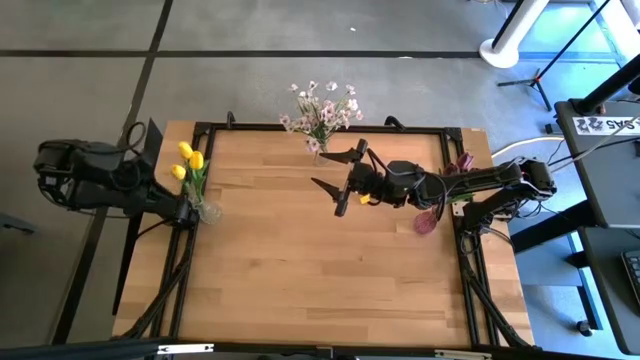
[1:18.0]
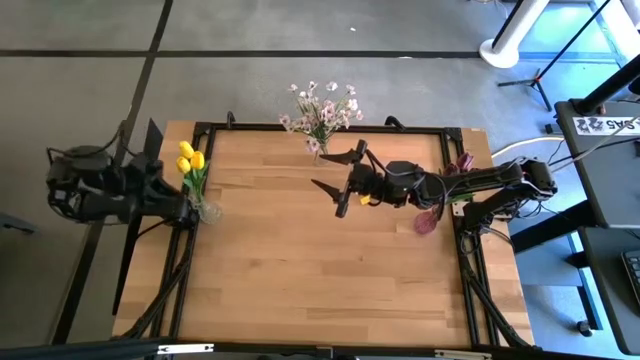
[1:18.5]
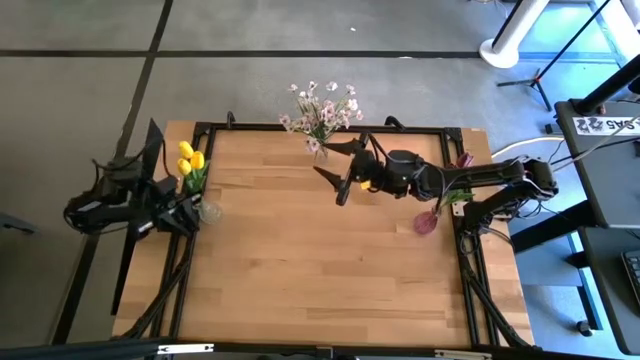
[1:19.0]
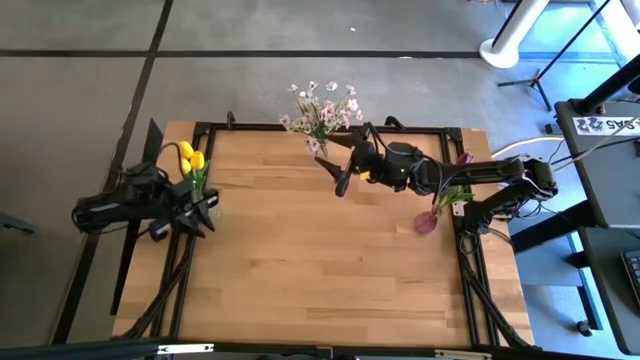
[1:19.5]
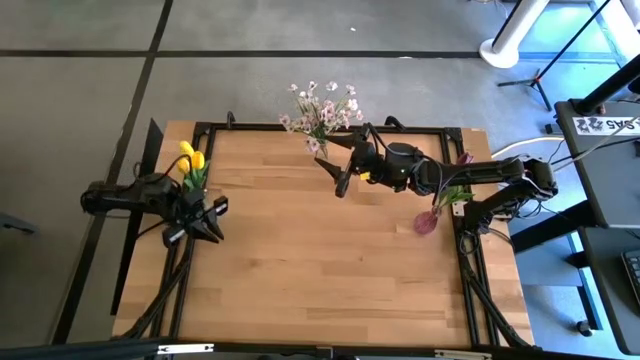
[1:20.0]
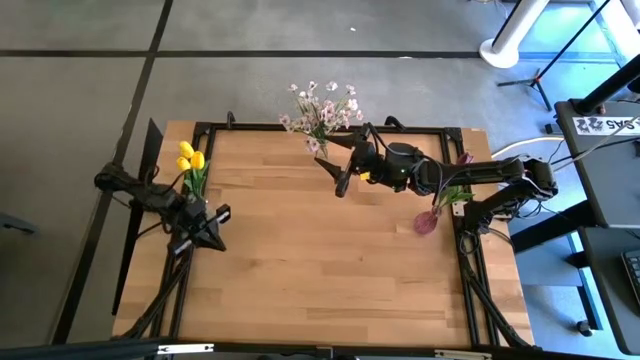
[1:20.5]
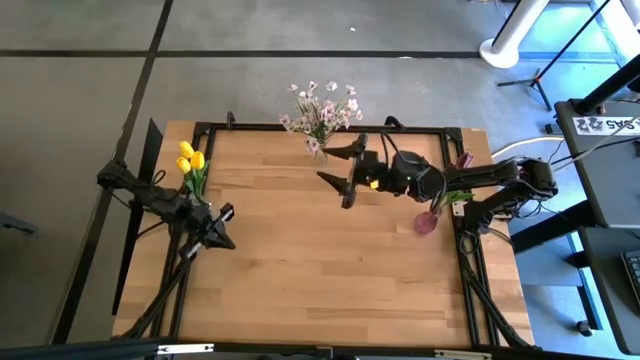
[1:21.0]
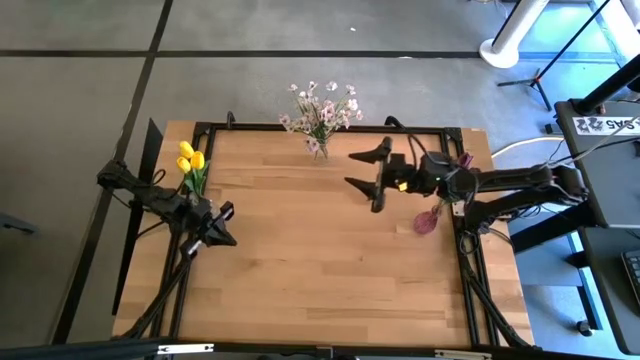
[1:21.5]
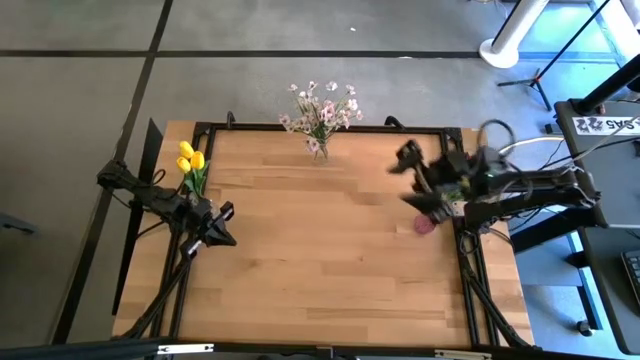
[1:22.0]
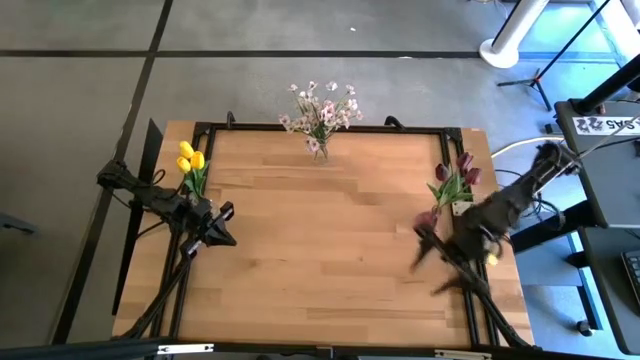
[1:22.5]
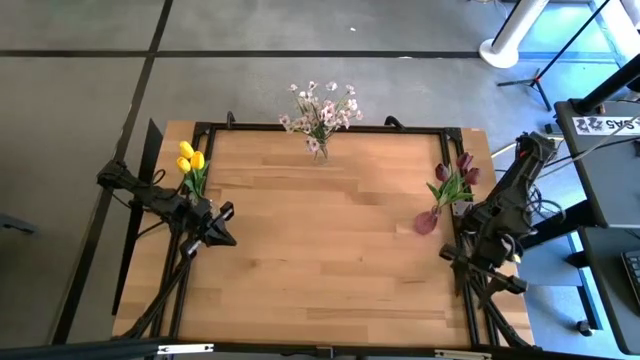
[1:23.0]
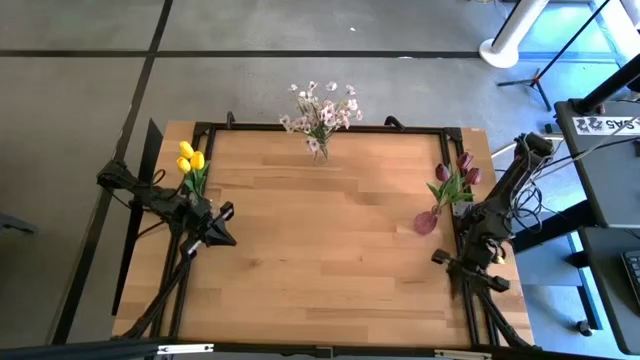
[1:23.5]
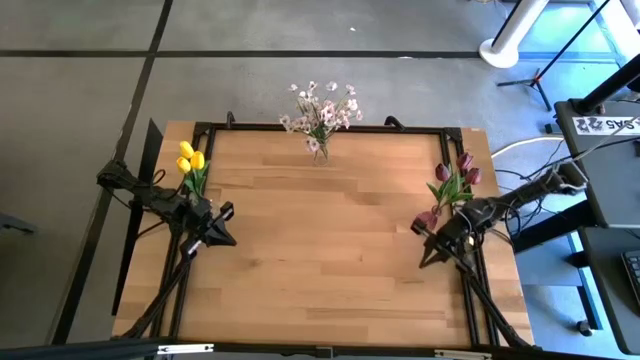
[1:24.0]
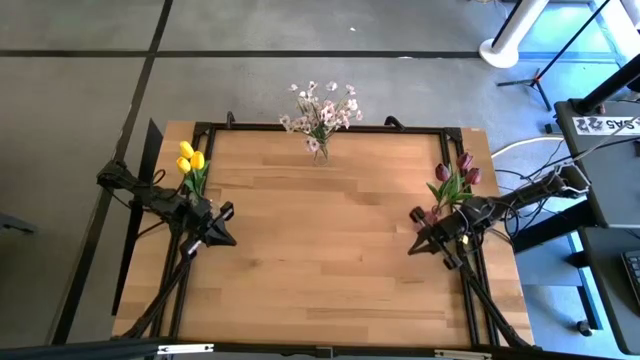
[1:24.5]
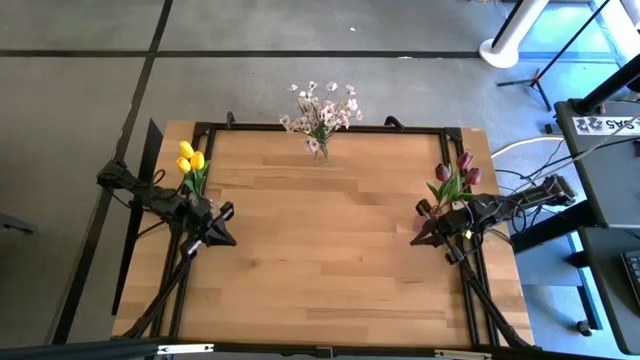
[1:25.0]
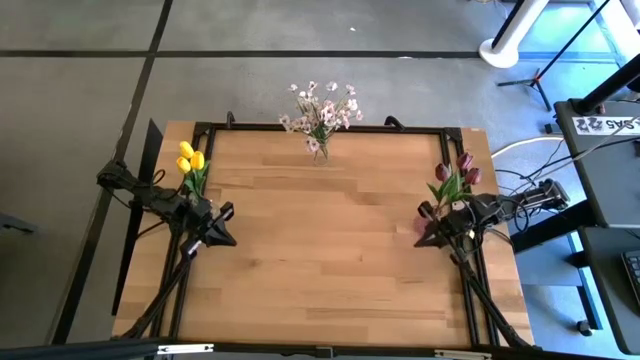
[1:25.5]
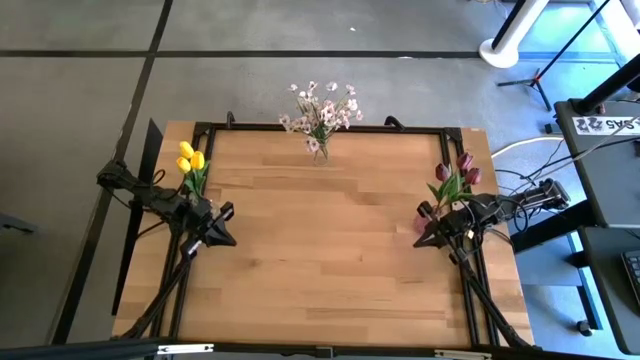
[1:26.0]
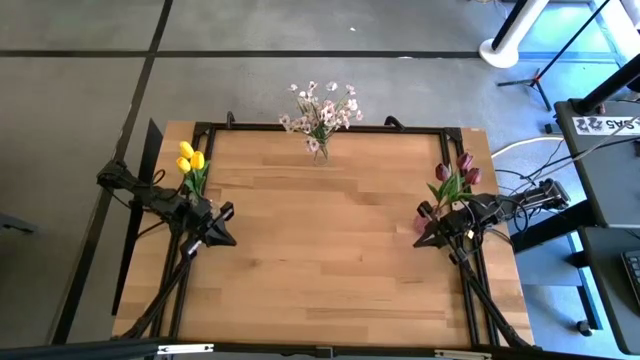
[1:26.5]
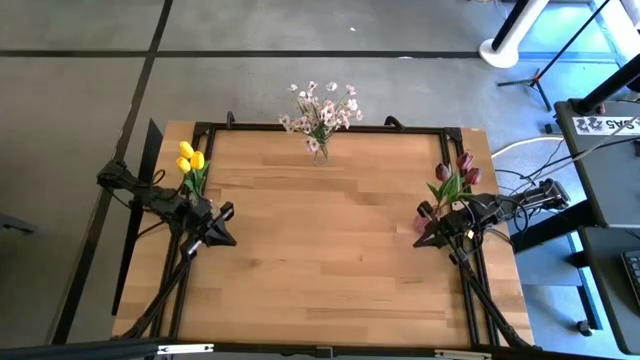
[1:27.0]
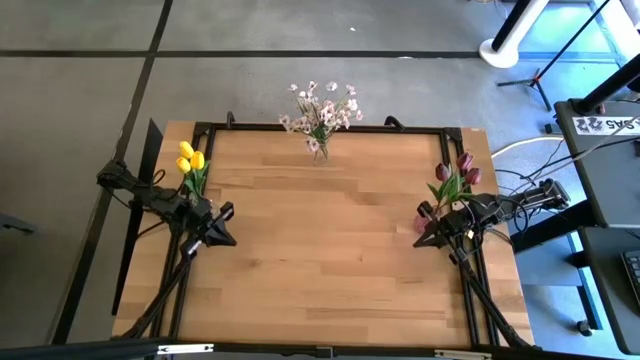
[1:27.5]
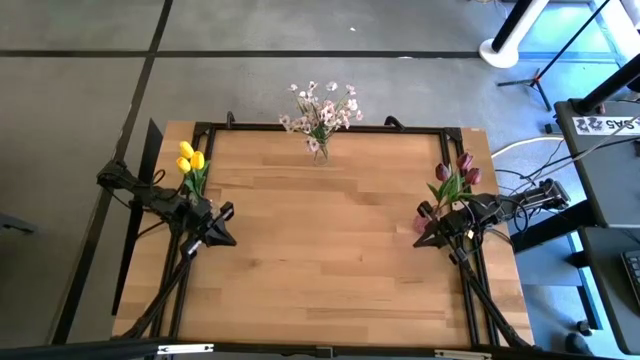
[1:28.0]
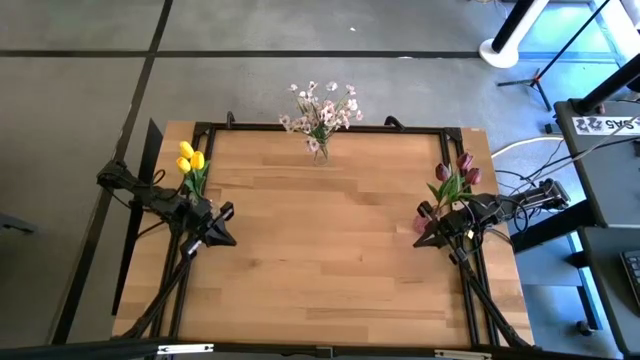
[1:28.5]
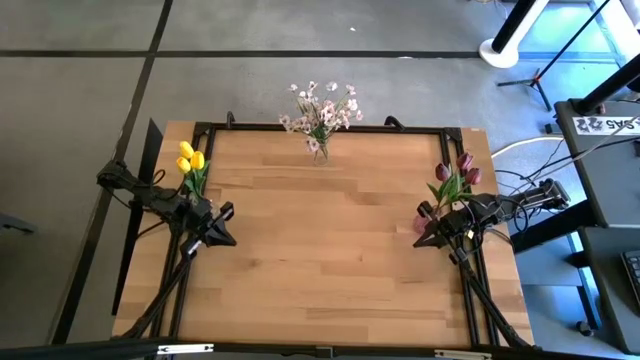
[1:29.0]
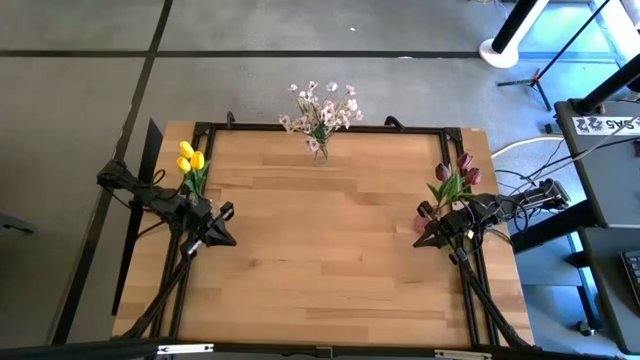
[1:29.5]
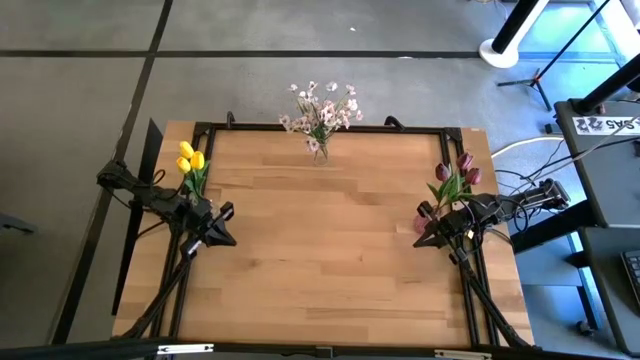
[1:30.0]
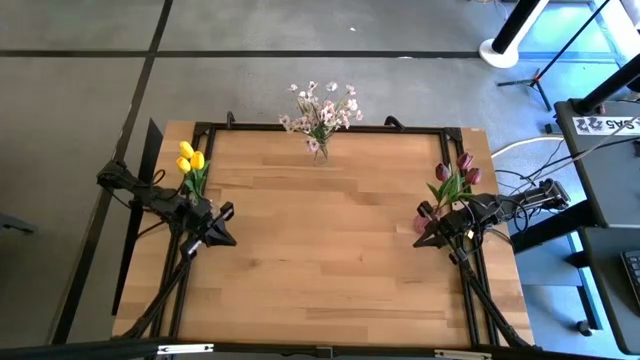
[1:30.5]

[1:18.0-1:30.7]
Task: Sort flowers into vase by color
Return to Home Position

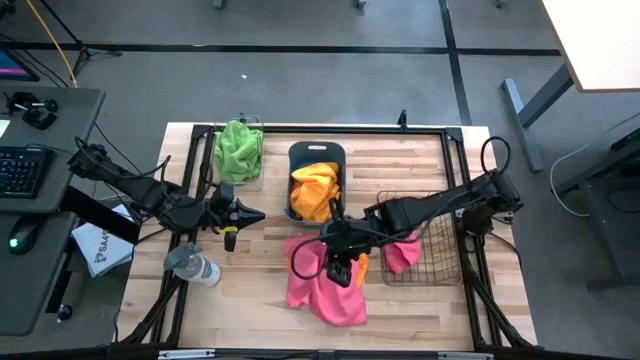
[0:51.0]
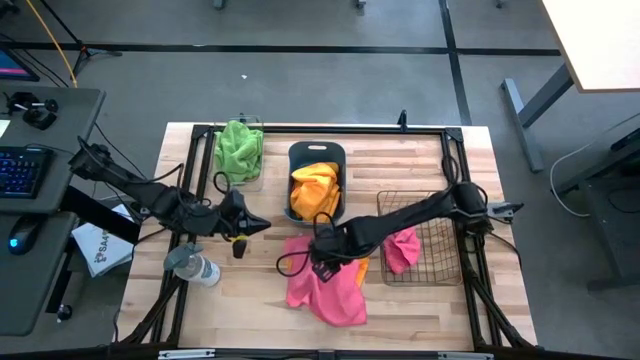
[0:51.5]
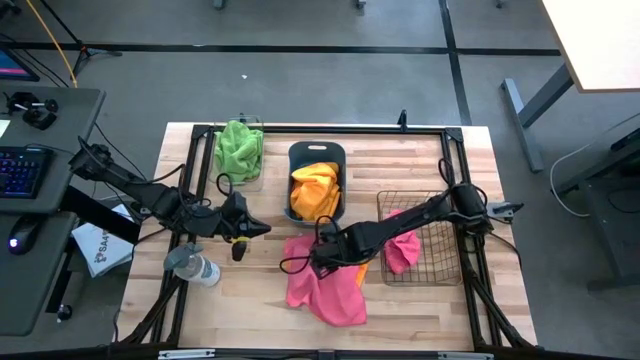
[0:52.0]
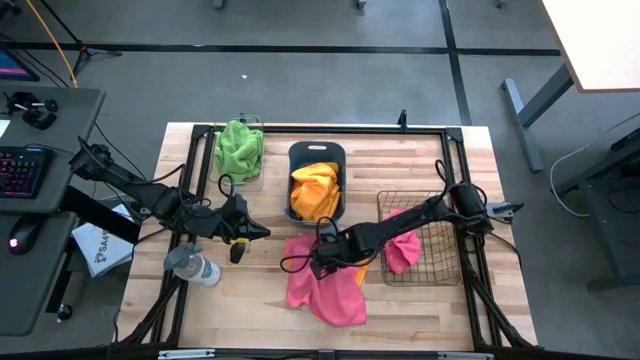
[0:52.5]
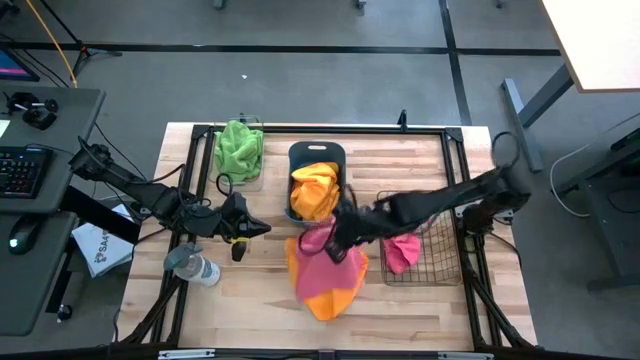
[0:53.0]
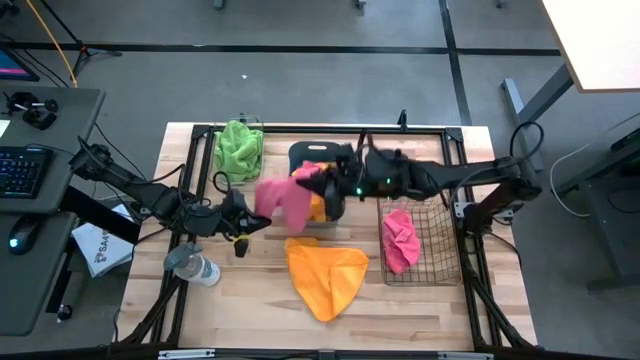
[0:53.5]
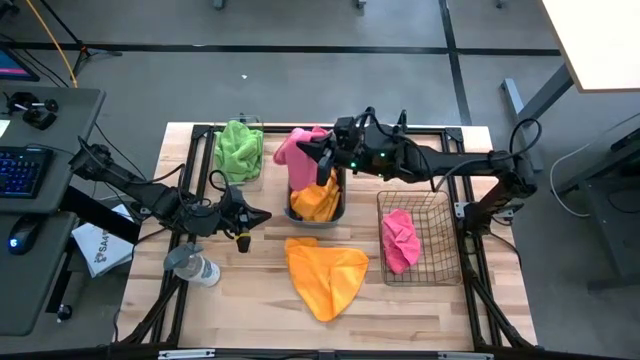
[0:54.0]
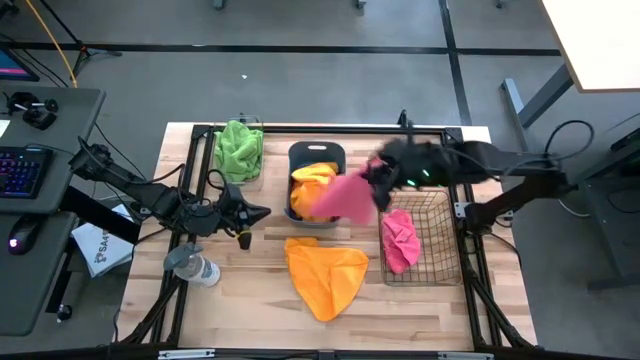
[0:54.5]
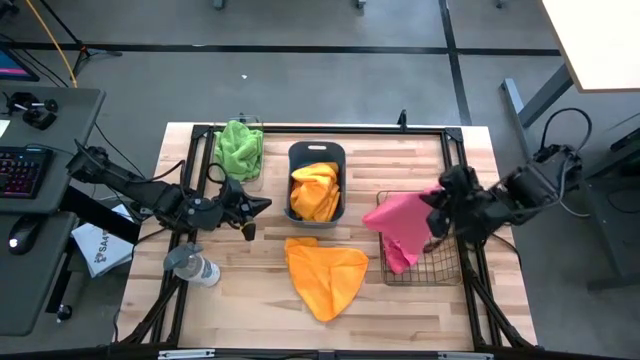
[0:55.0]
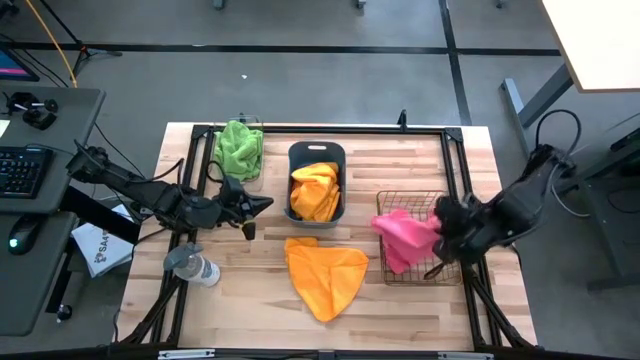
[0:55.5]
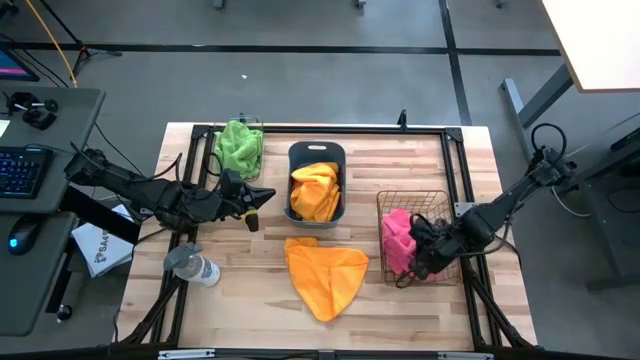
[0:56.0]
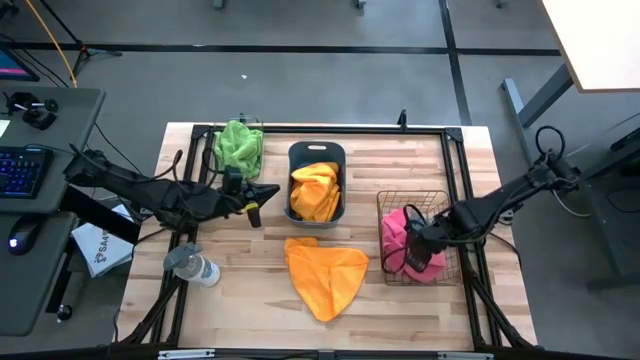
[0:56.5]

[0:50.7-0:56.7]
Task: Sort microfiber towel by color & place in baskets
Put the pink towel into the brown wire basket

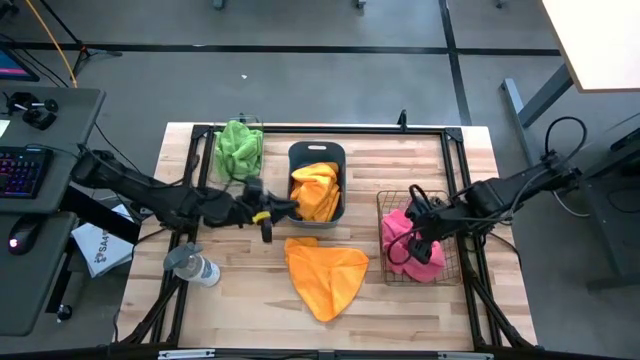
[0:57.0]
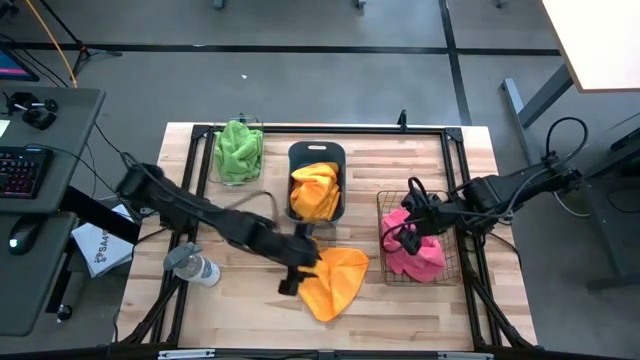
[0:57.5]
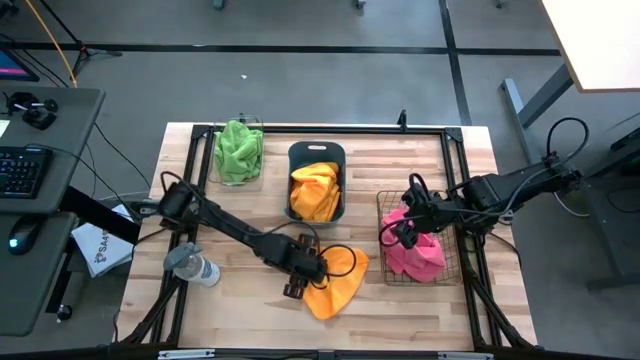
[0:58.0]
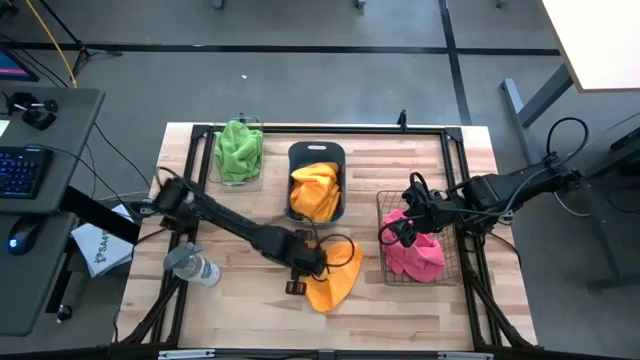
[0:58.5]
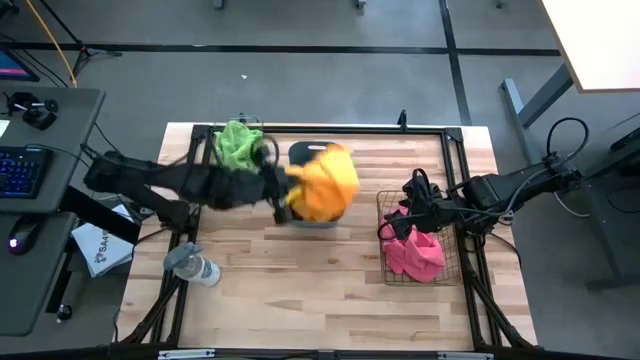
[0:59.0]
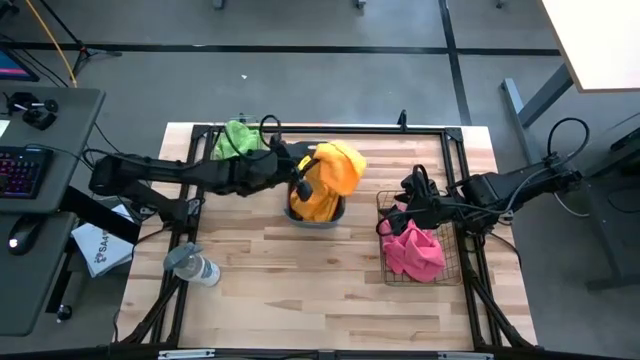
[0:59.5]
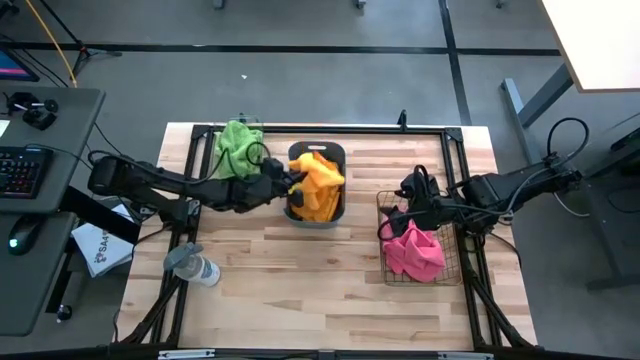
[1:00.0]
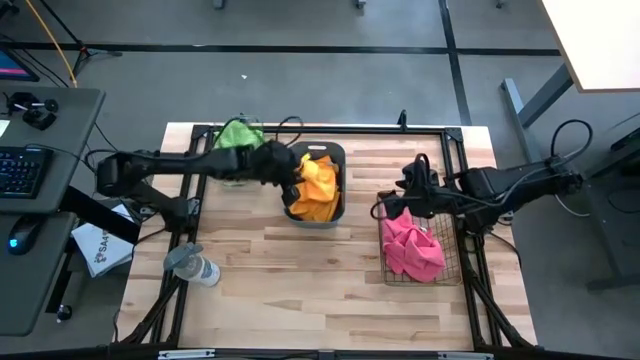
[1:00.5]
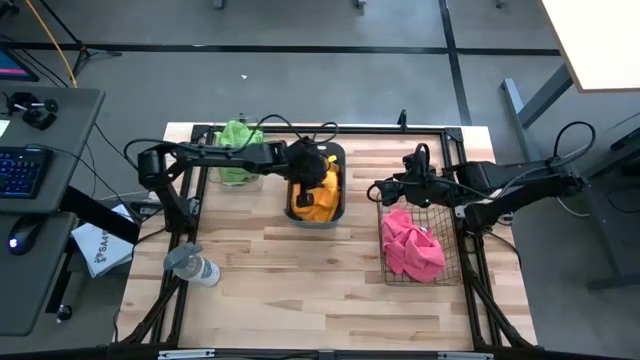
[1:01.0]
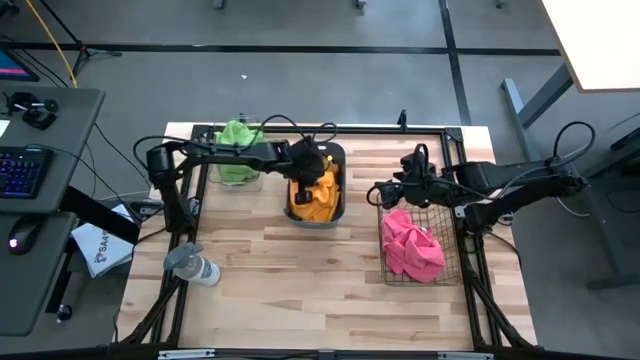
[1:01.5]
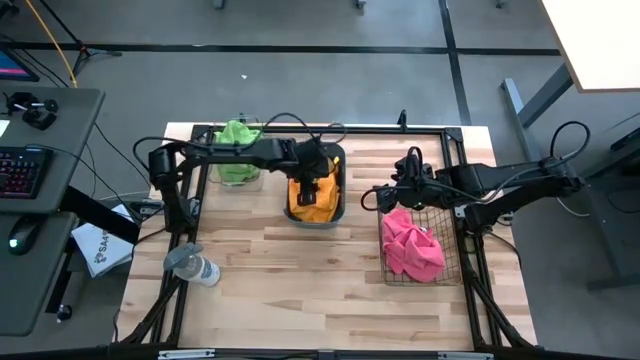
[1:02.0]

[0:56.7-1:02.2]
Put the orange towel into the blue bin
